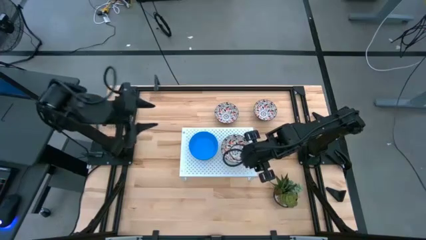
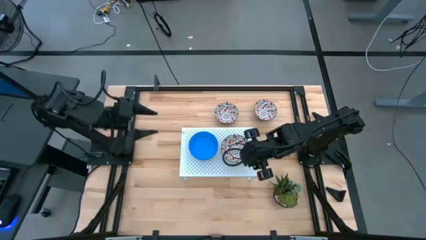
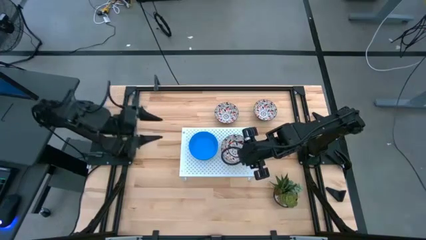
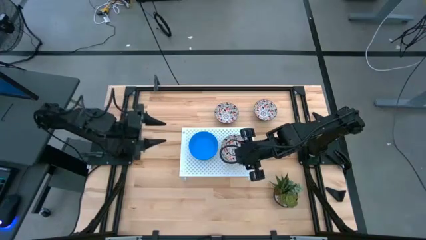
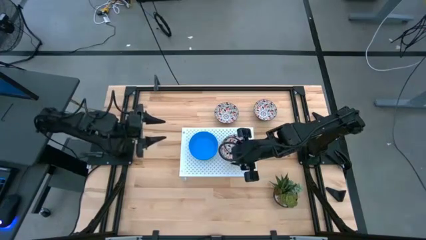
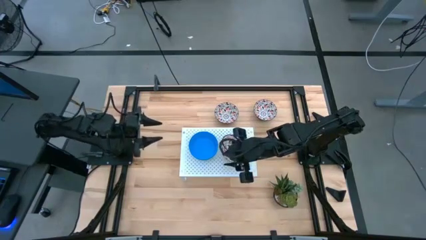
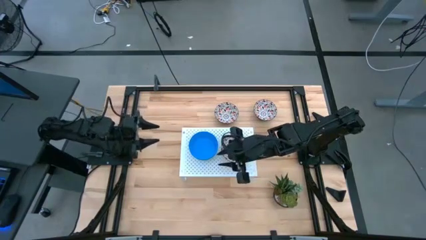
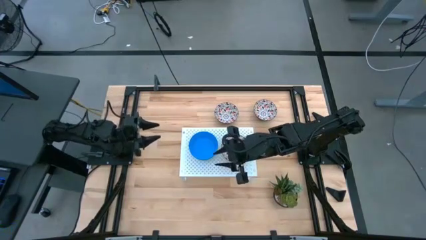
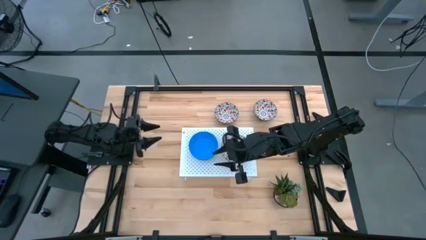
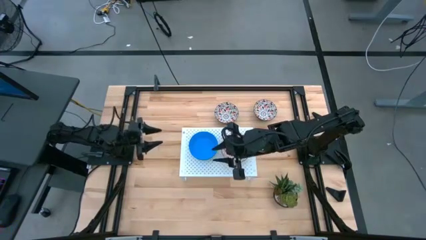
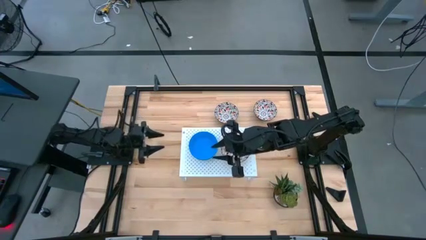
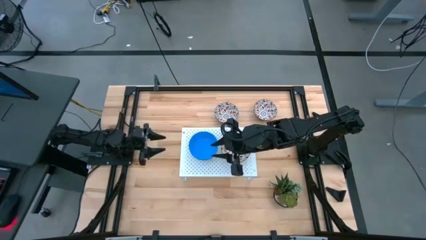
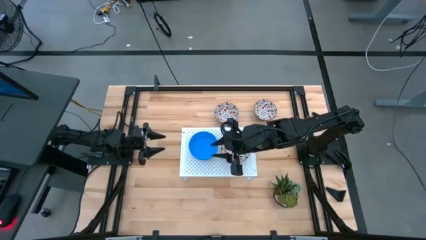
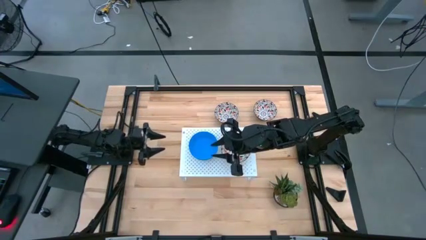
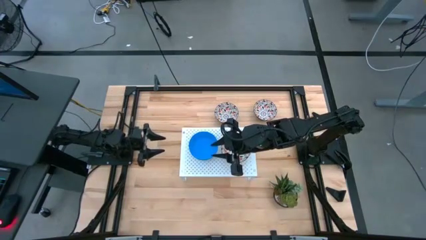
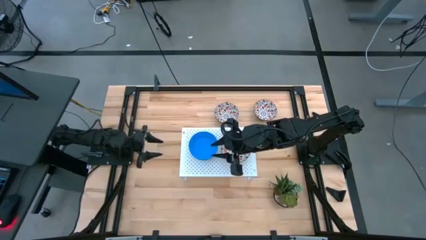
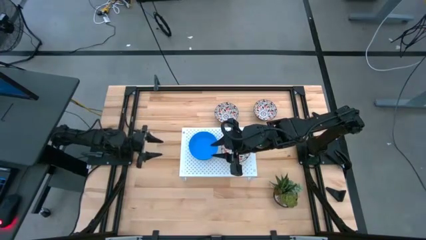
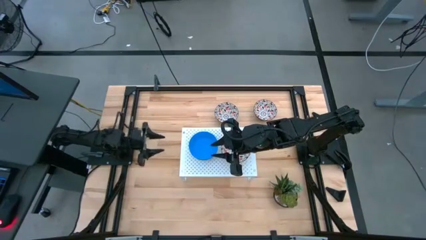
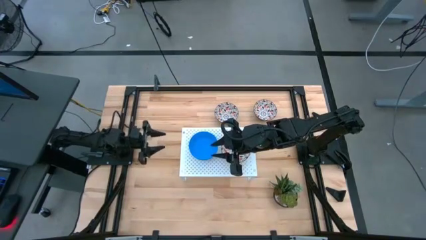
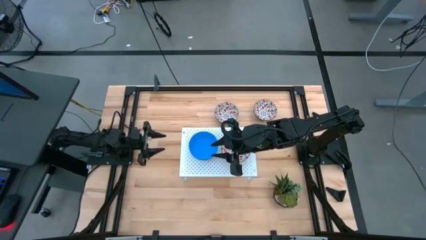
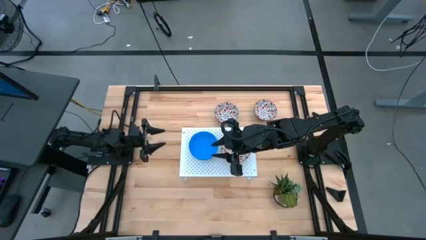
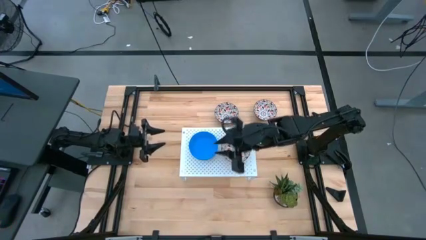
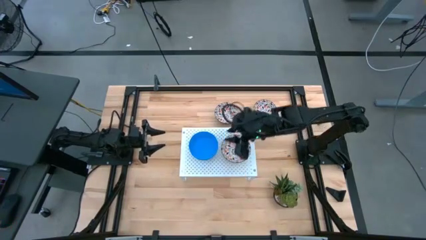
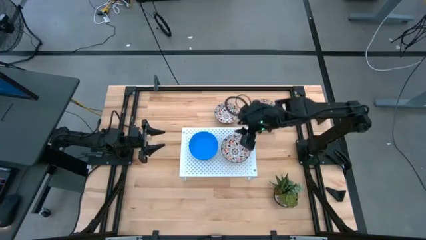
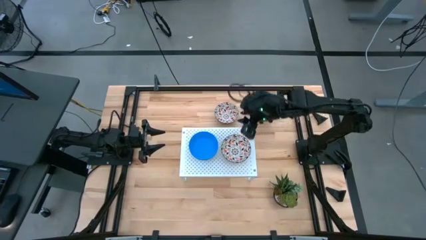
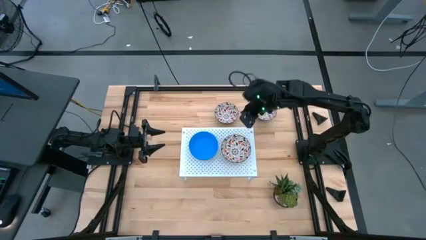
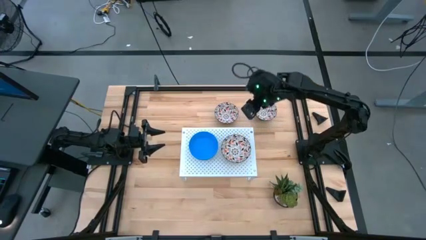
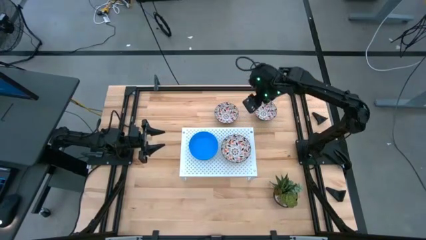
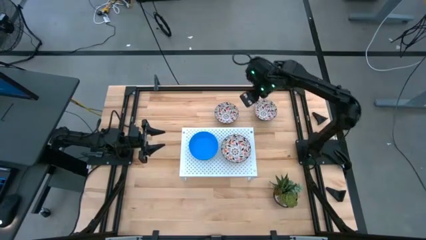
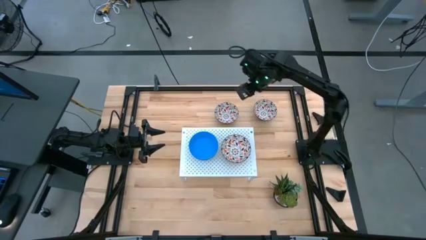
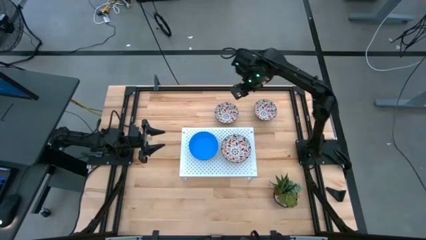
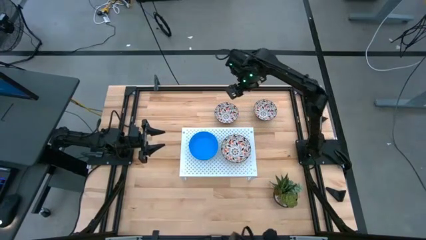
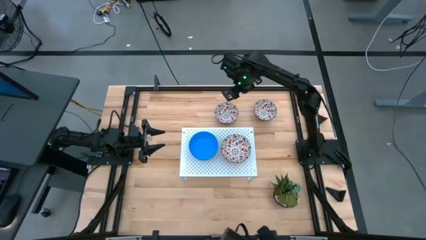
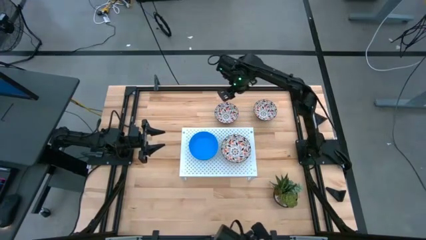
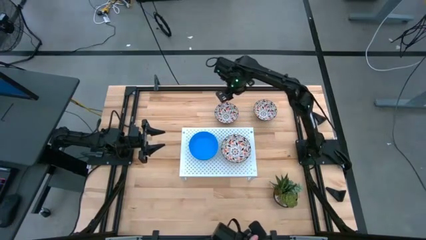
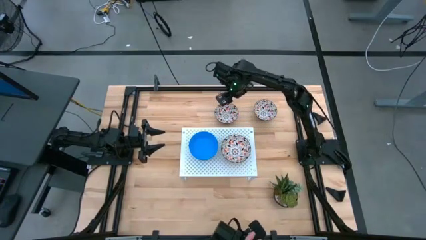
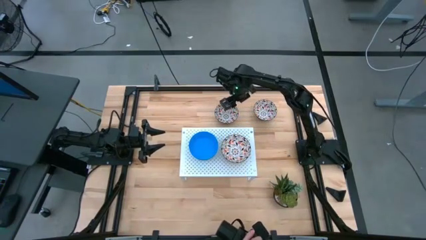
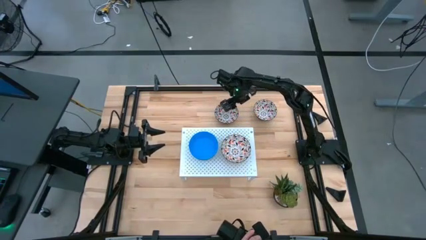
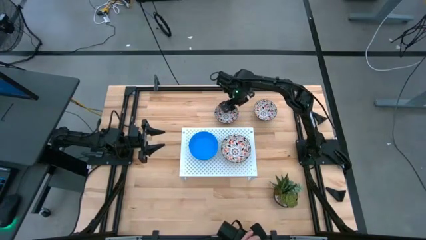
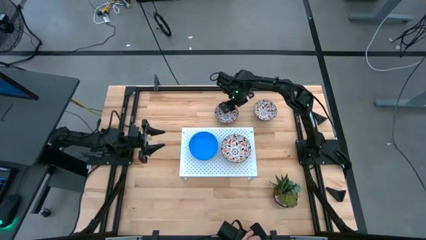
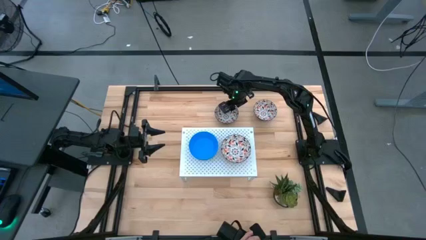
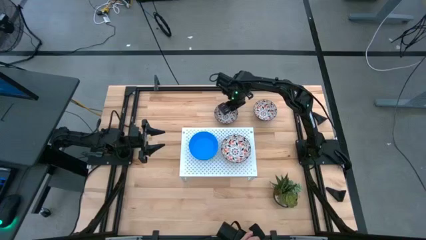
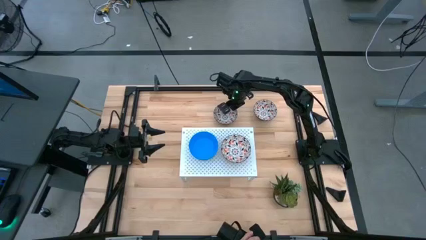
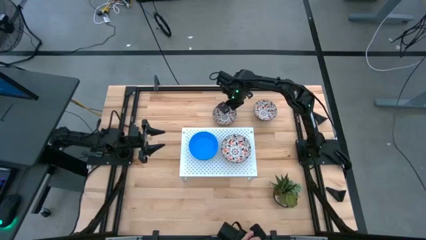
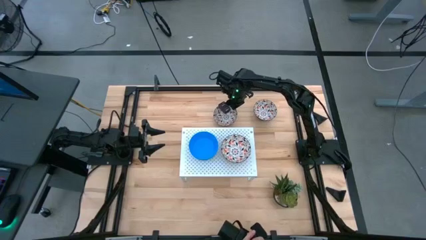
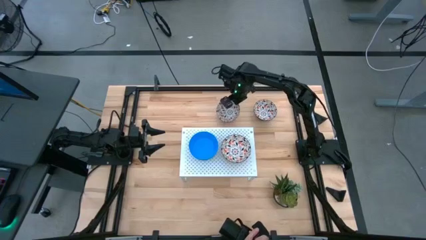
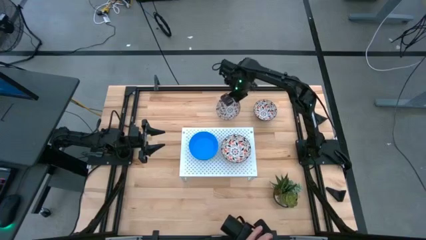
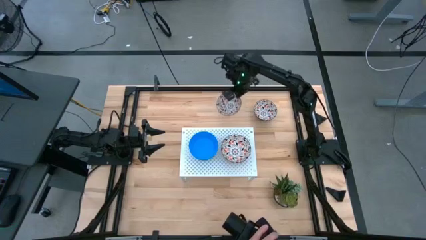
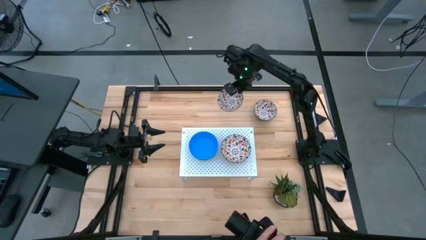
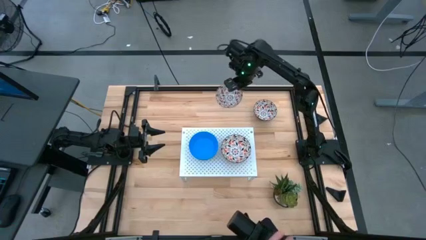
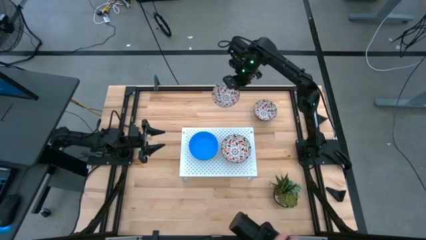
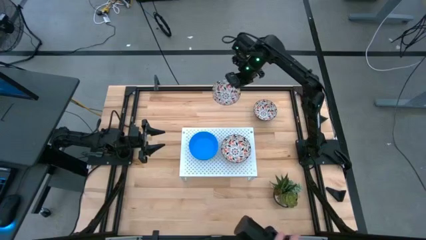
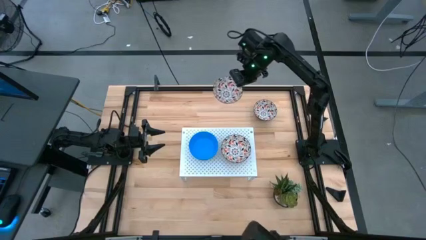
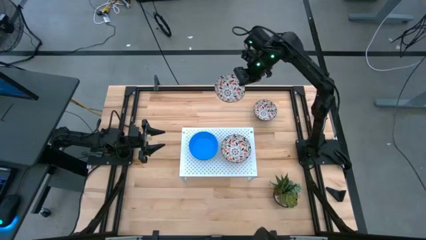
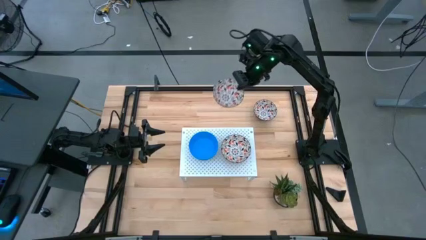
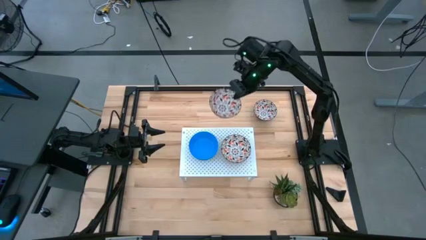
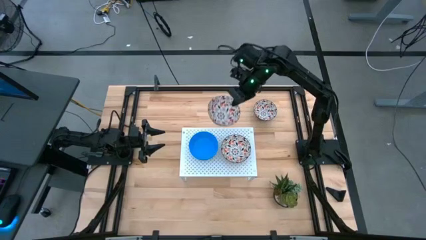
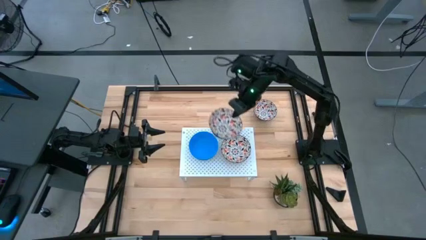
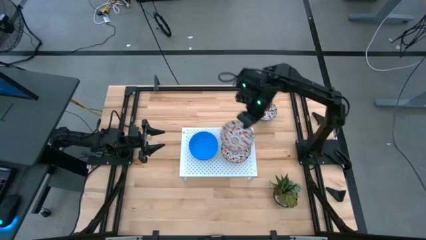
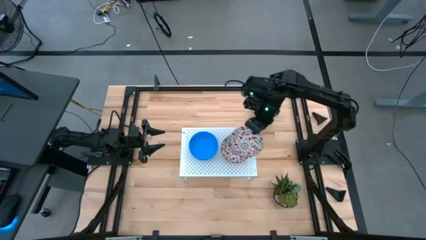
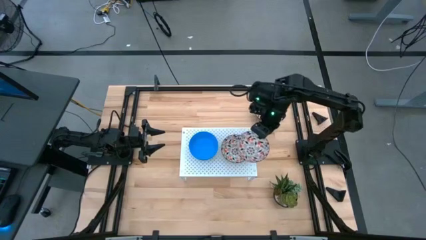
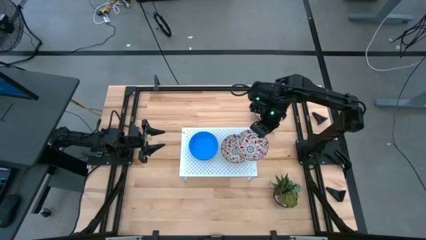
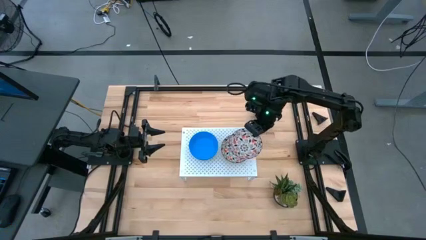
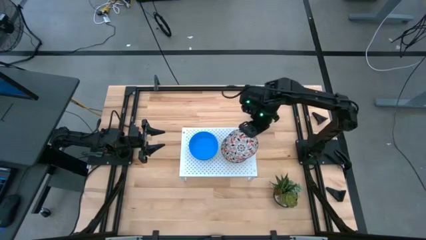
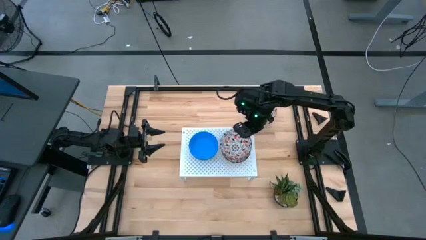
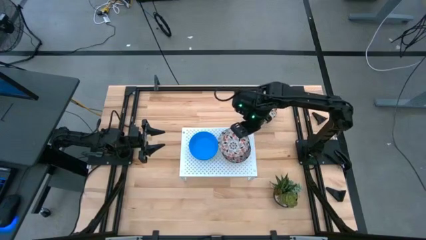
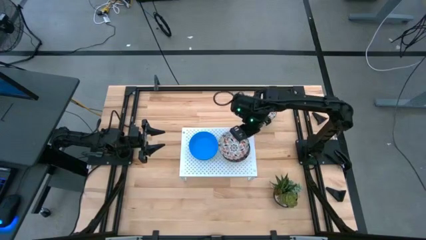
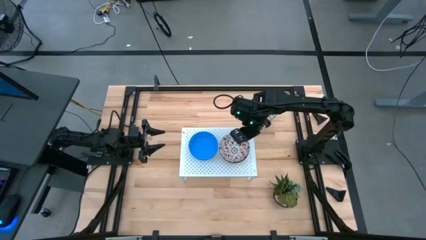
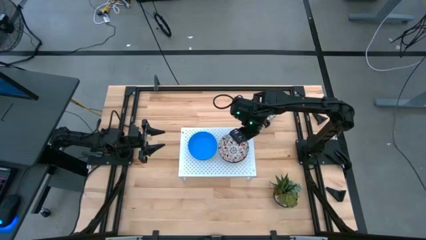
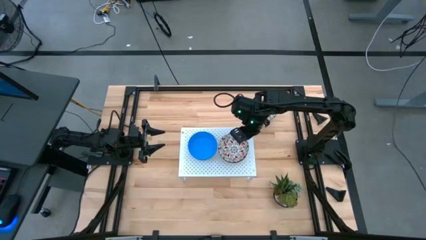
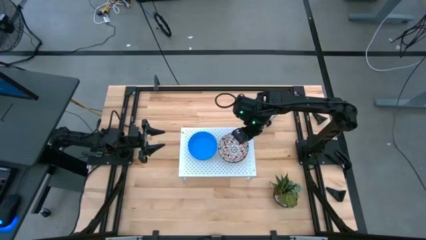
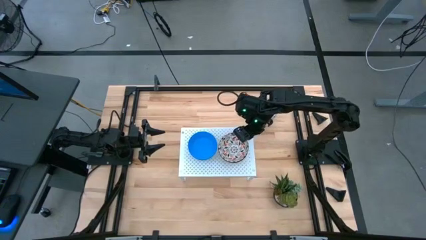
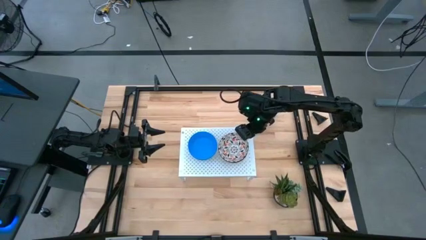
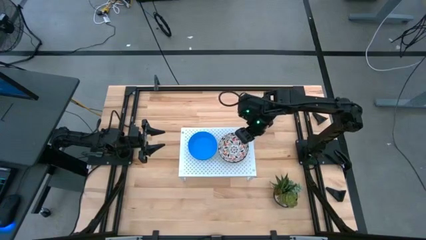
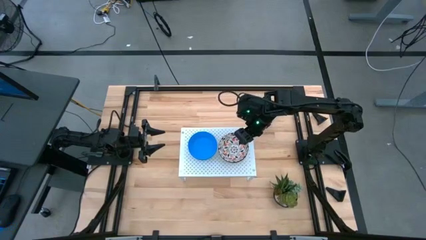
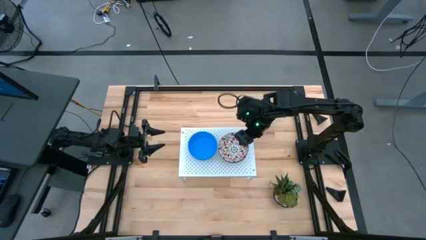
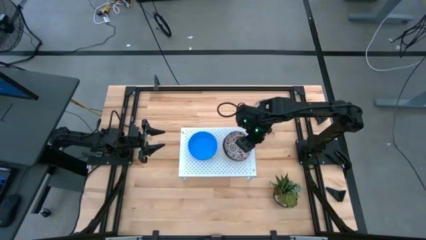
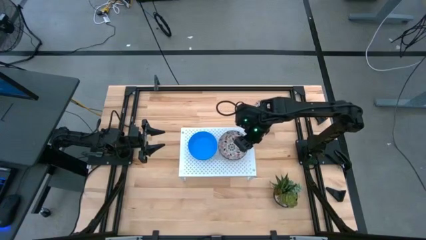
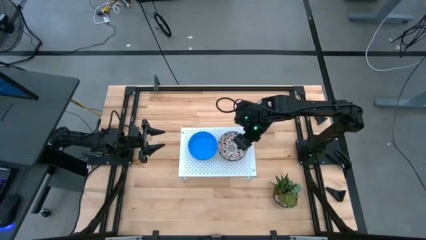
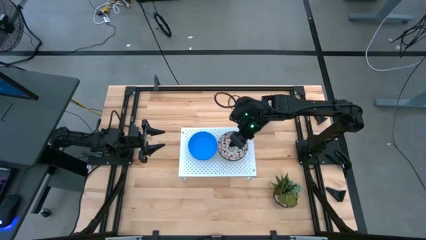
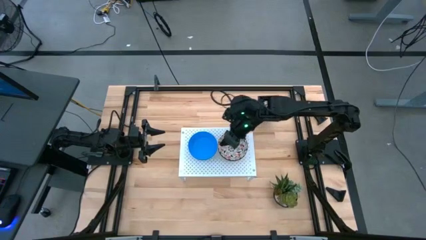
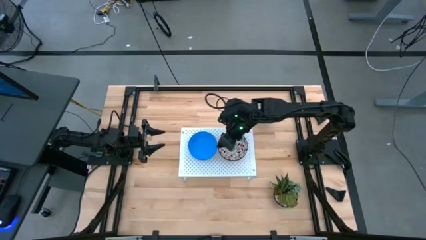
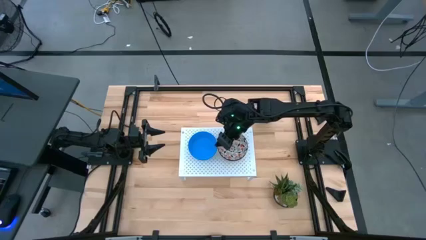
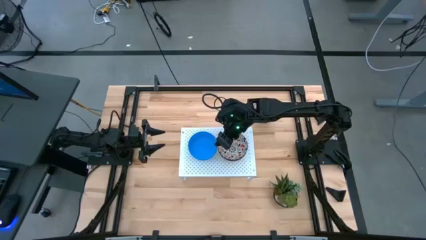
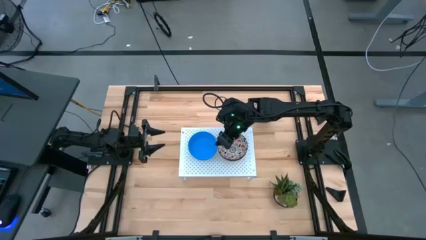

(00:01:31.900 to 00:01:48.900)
Task: Pick & Place Mini bowls
Stack the left orange patterned bowl on top of the orange patterned bowl on the shelf
